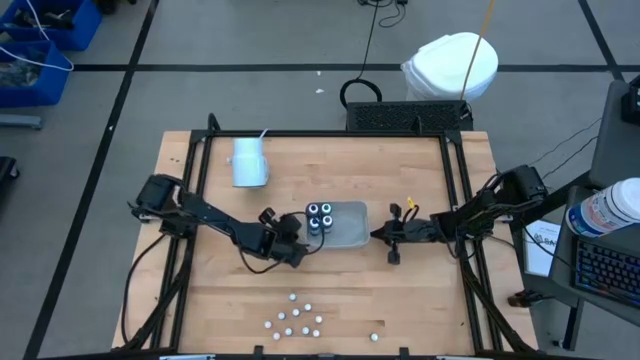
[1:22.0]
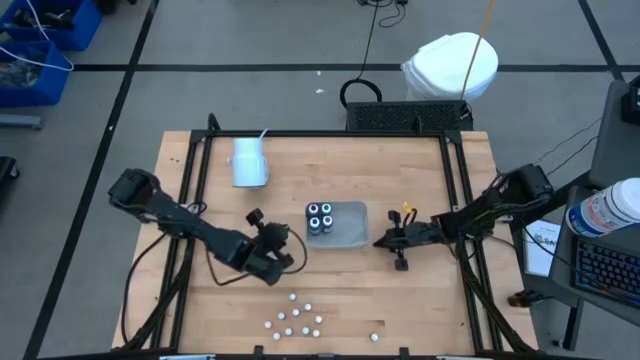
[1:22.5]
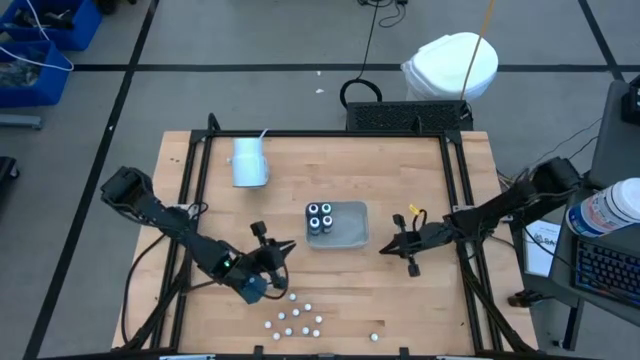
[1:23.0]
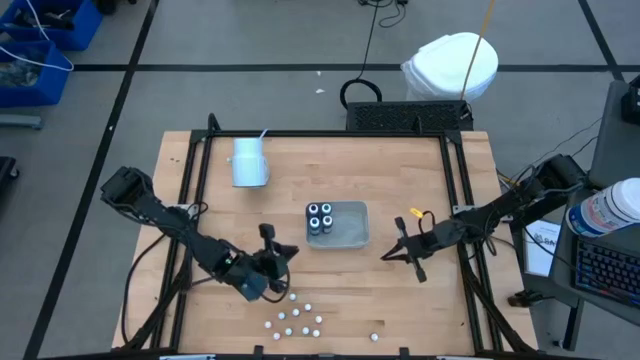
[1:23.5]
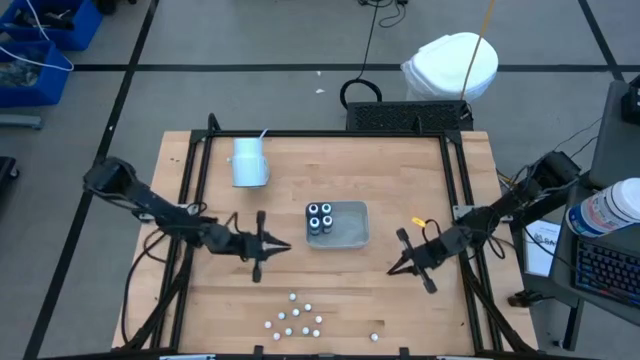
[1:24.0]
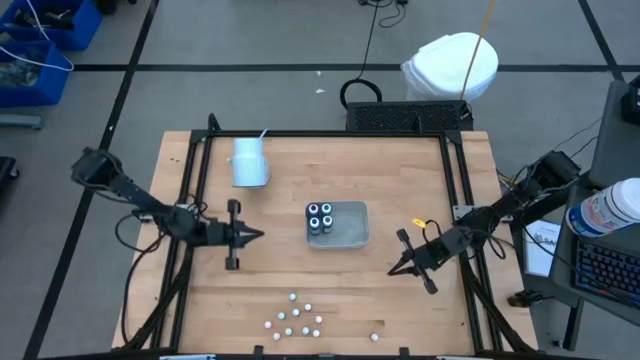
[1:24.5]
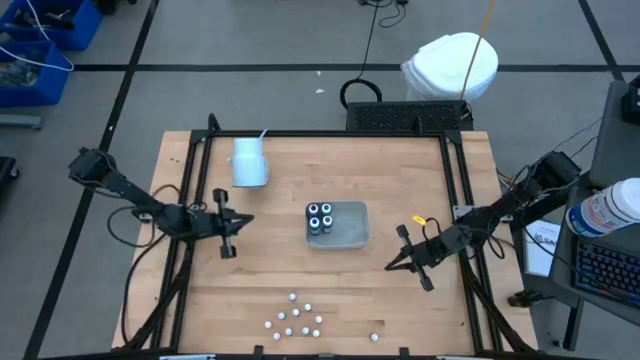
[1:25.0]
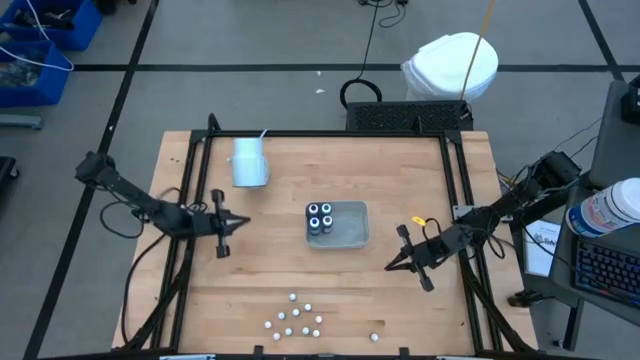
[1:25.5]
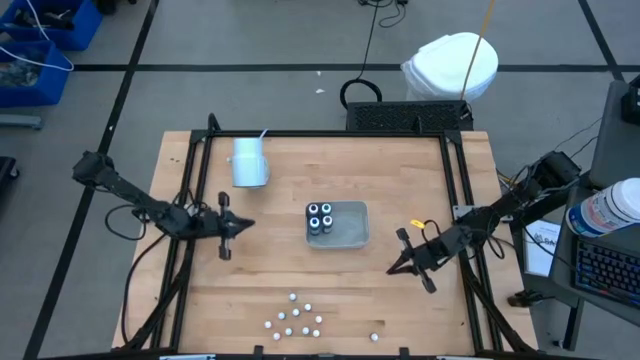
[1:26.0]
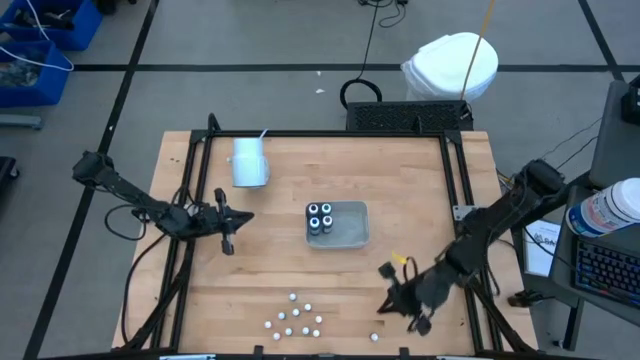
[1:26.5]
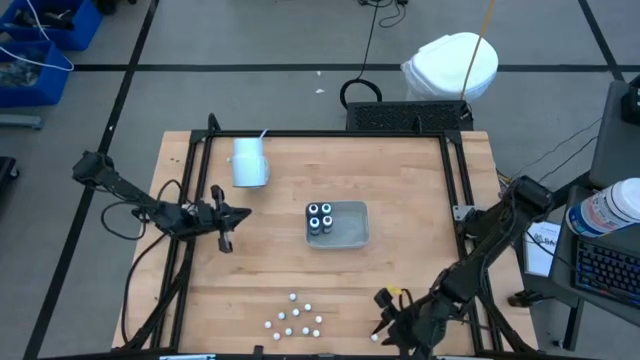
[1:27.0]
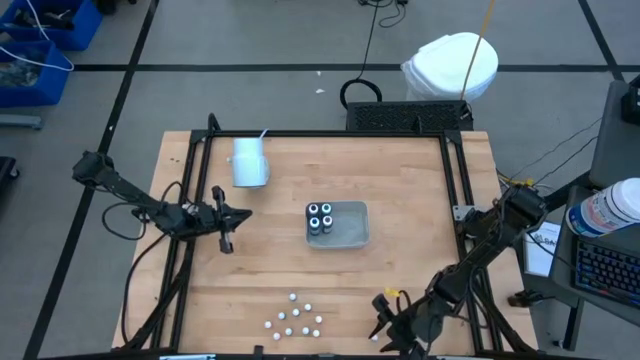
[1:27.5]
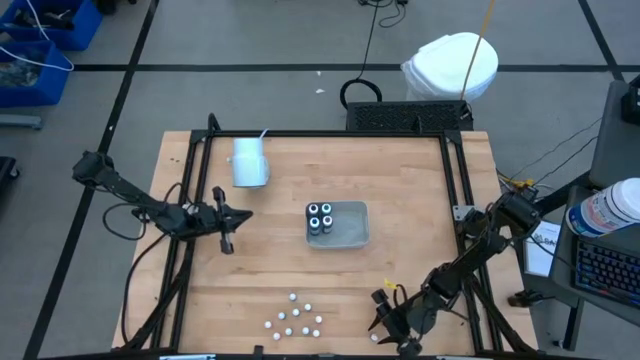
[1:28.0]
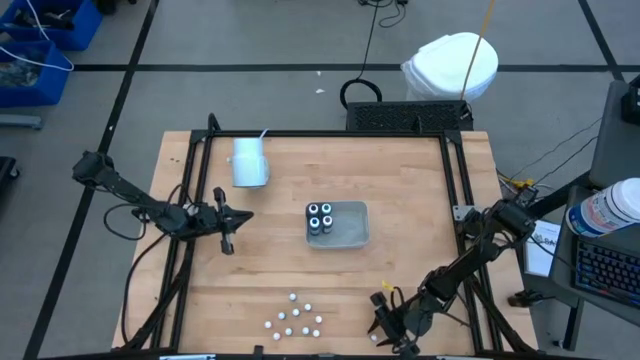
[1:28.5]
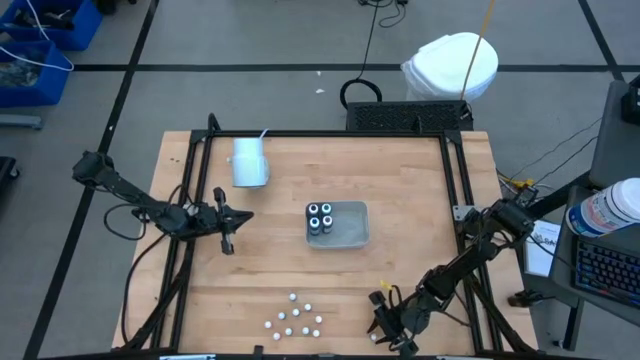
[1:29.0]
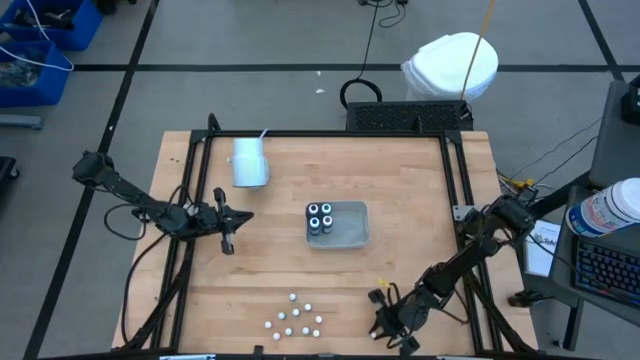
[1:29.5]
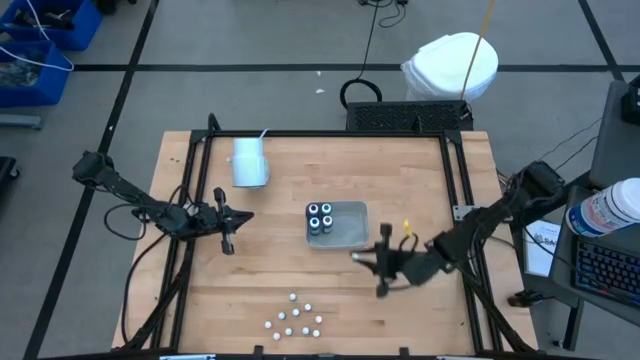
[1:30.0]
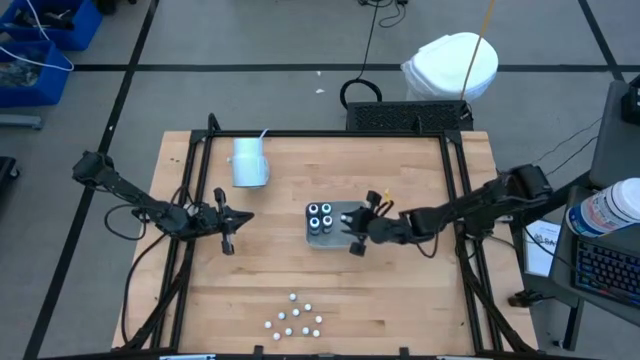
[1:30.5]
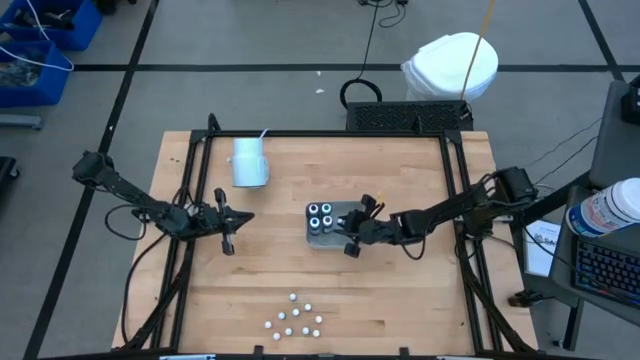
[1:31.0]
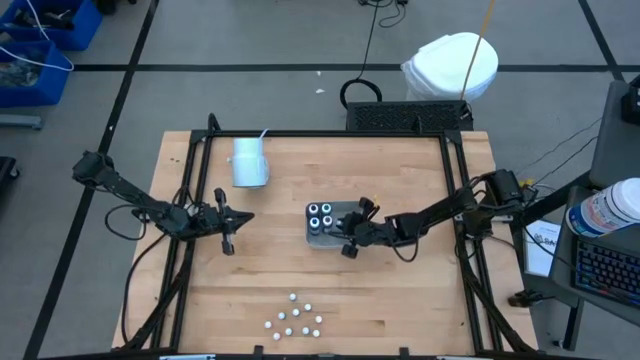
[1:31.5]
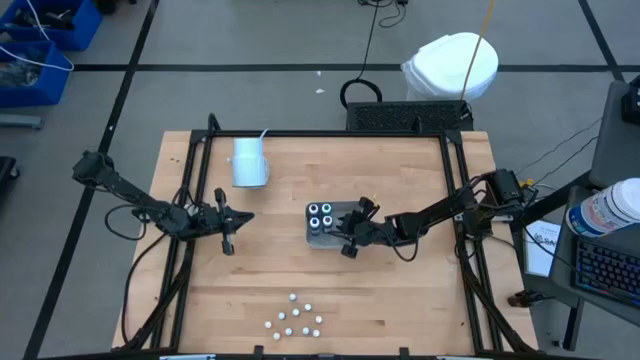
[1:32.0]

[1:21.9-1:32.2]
Task: Pick & Place food coloring
Put the small red food coloring bottle into the white container

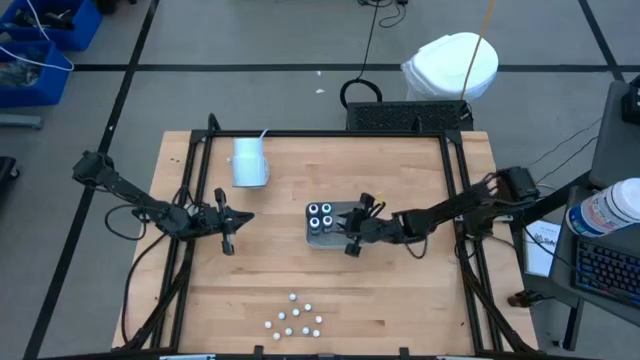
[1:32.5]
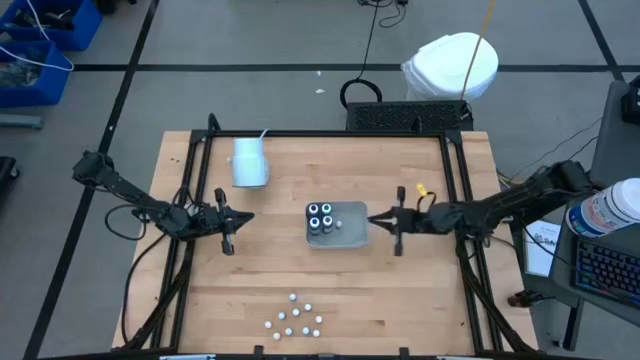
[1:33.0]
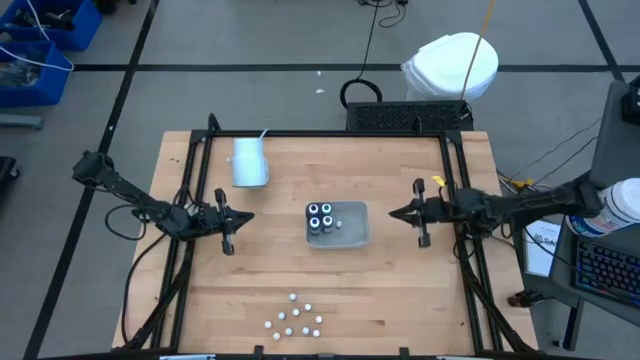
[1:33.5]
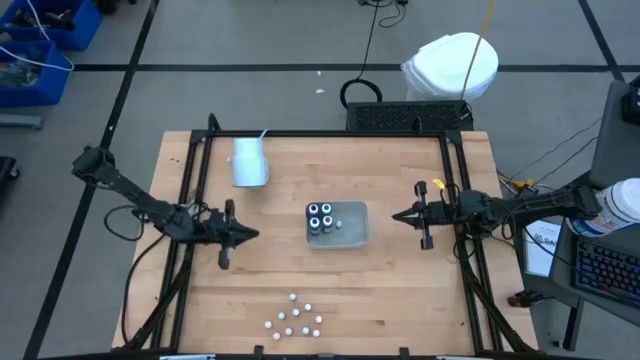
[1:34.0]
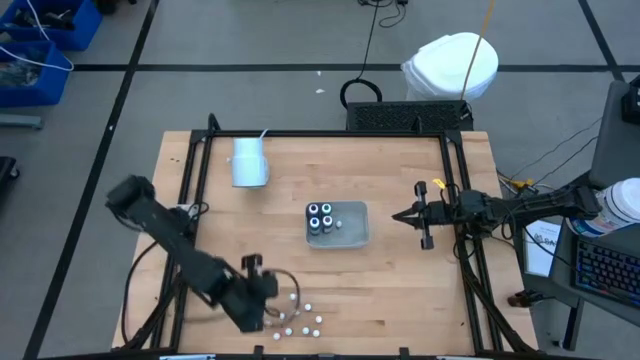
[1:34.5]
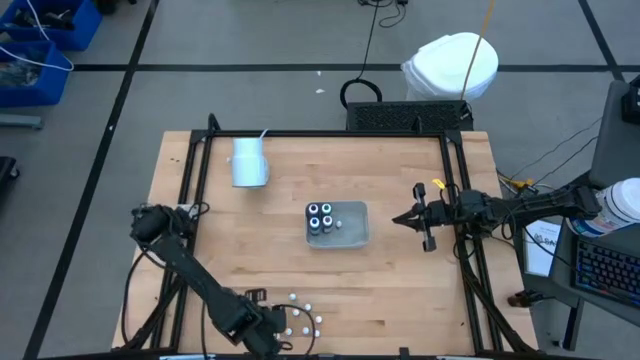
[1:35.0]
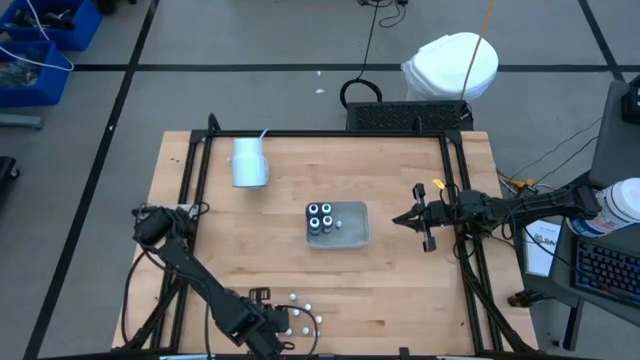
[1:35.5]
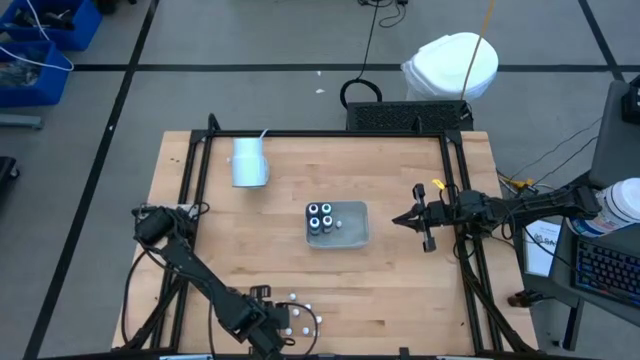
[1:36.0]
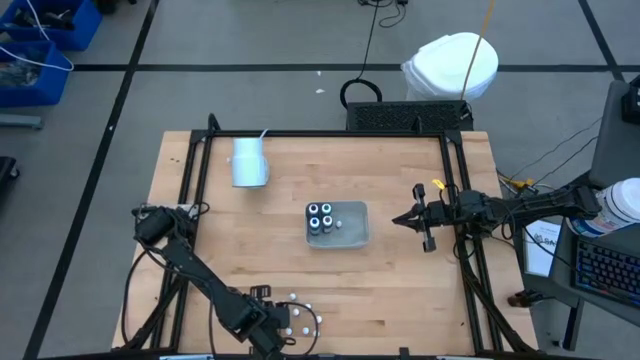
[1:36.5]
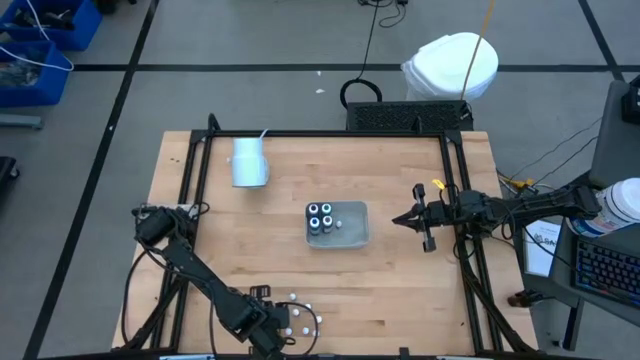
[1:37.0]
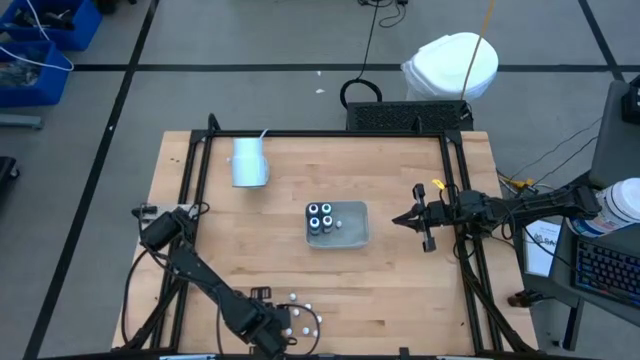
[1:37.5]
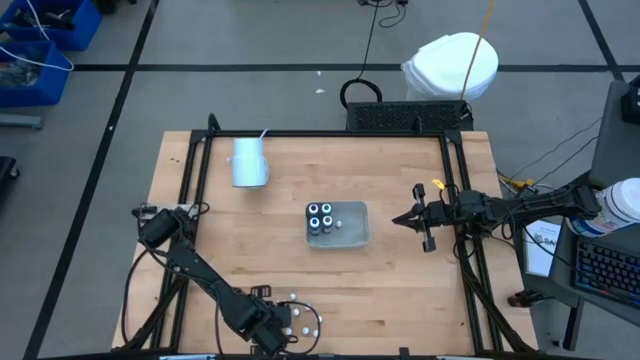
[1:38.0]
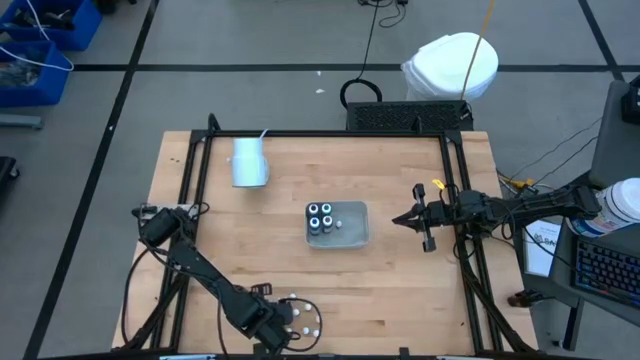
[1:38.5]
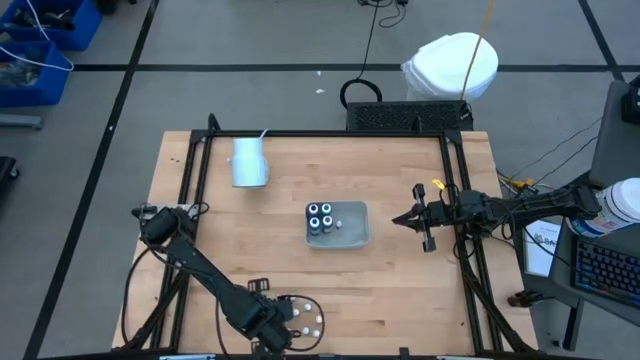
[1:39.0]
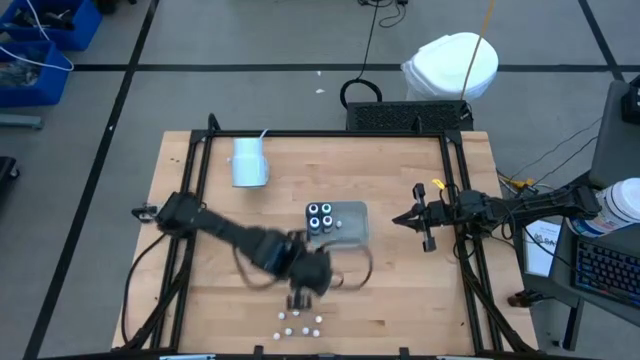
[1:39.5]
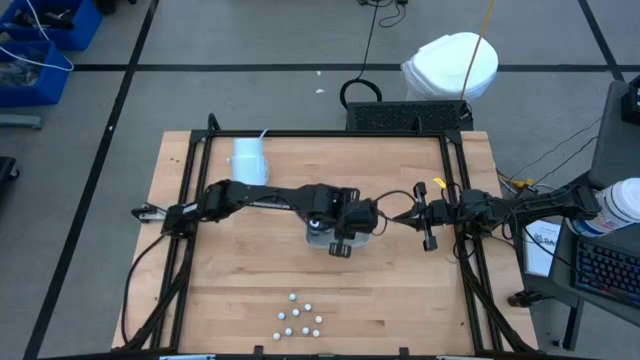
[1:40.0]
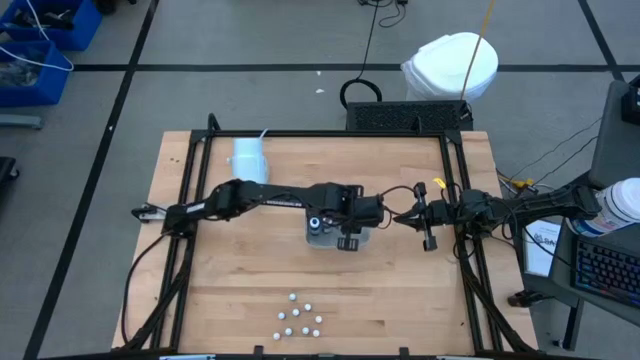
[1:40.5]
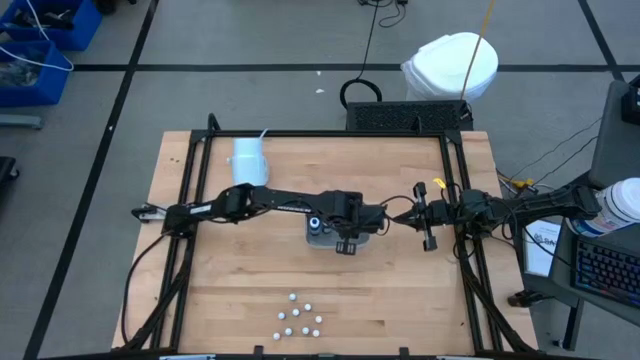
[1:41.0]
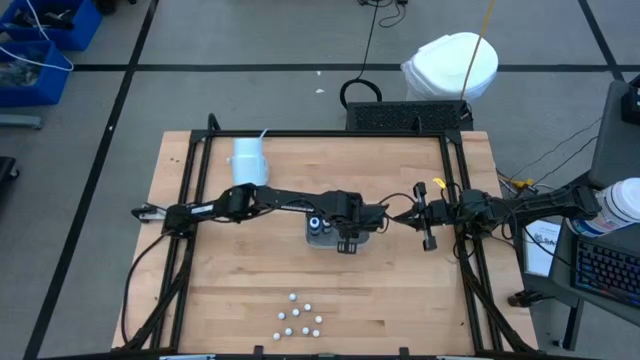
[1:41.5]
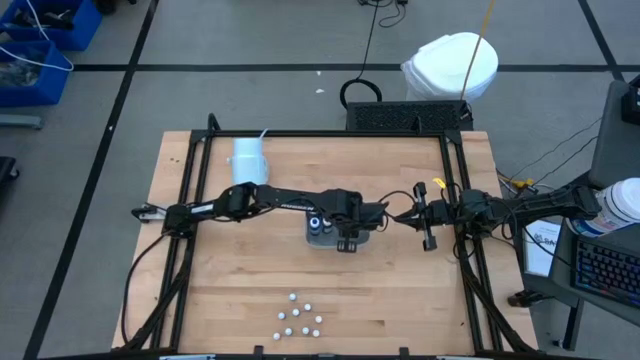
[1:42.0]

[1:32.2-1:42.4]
Put the small orange food coloring bottle into the white container

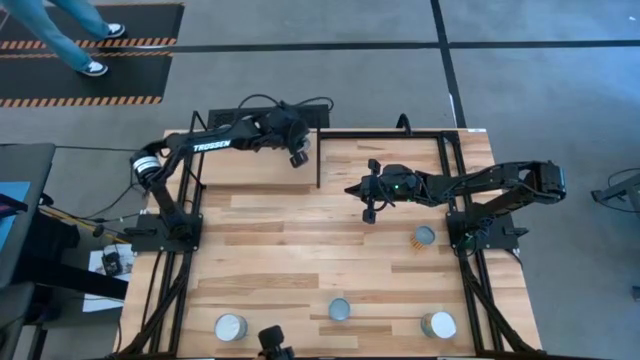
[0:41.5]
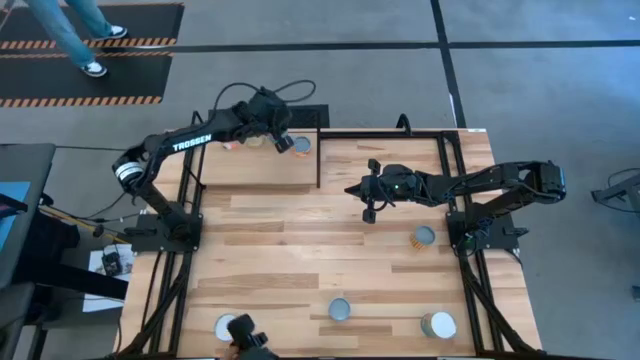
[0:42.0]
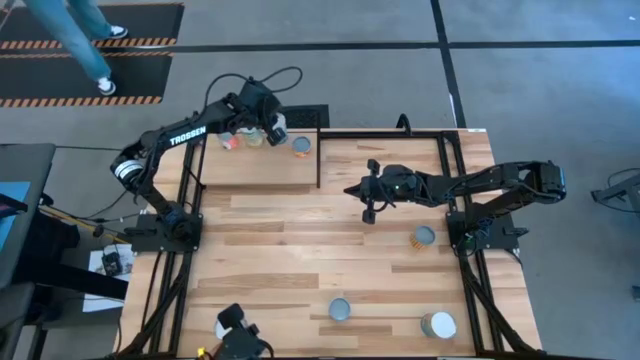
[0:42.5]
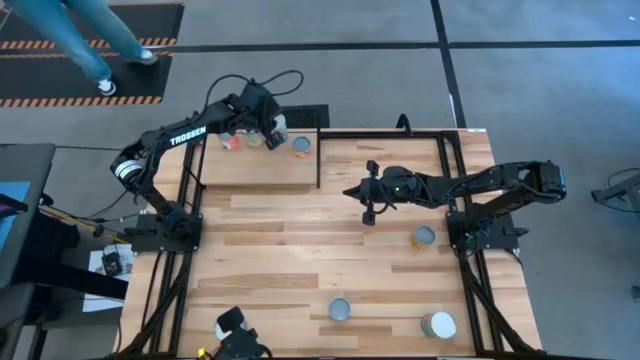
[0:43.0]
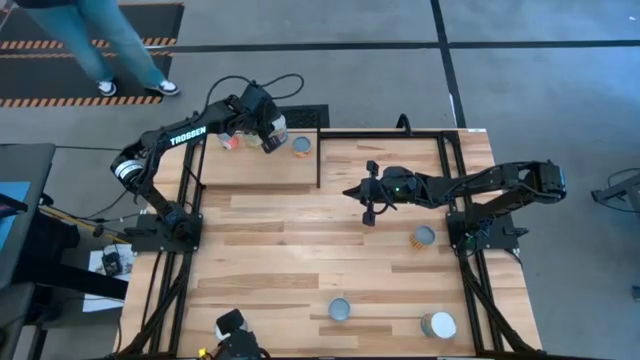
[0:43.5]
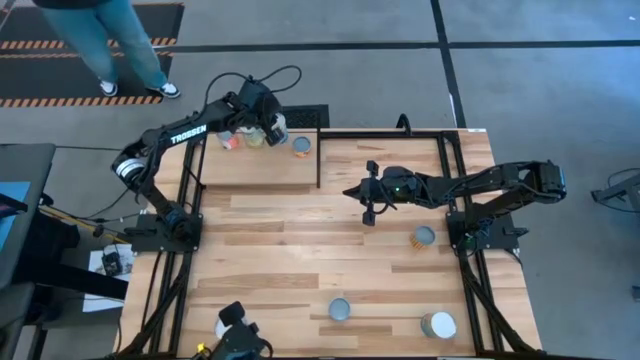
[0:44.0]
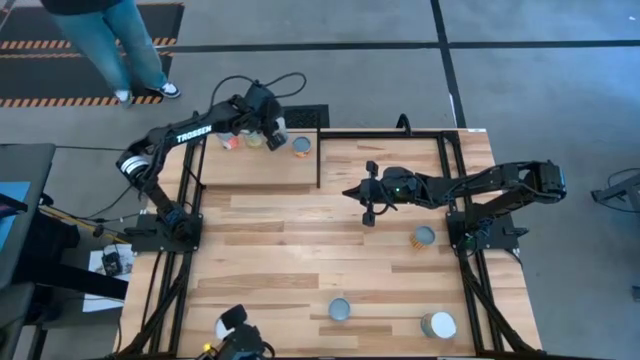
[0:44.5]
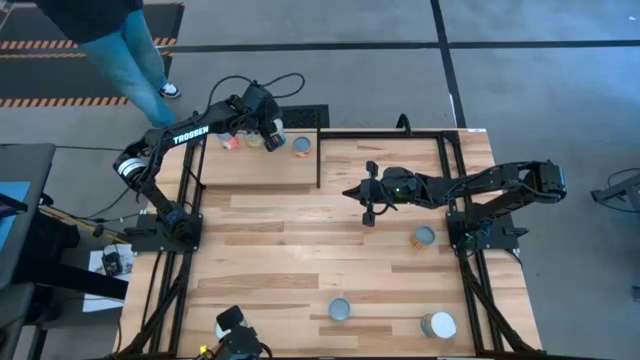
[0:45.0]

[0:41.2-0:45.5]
Task: Pick and place cans onto a shelf
Adjust the large canned tomatoes on the shelf
